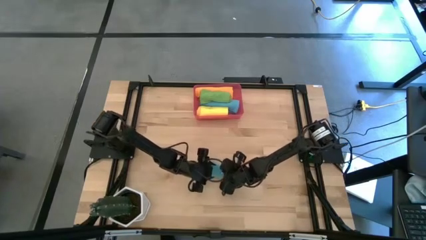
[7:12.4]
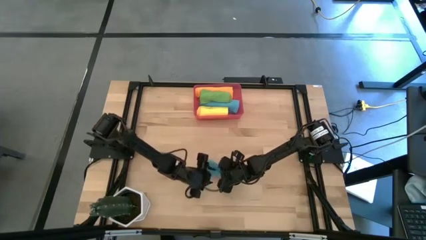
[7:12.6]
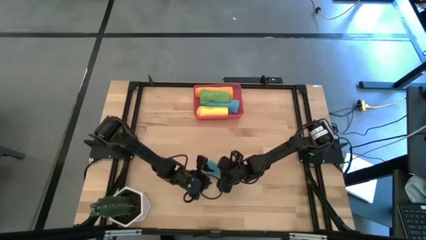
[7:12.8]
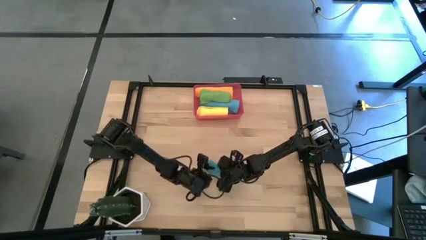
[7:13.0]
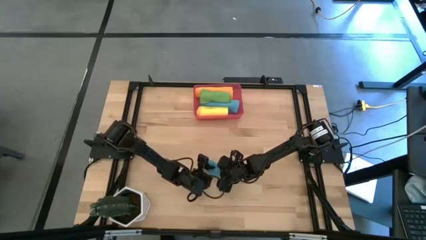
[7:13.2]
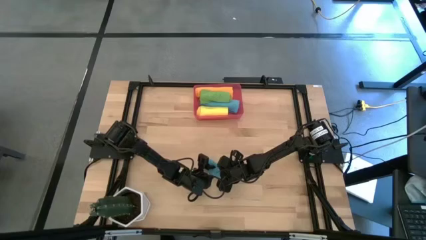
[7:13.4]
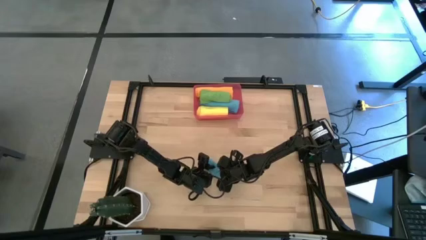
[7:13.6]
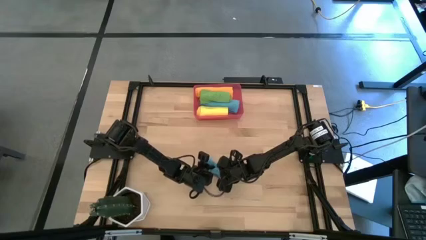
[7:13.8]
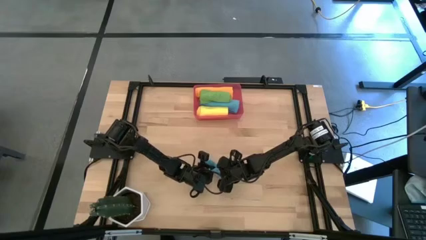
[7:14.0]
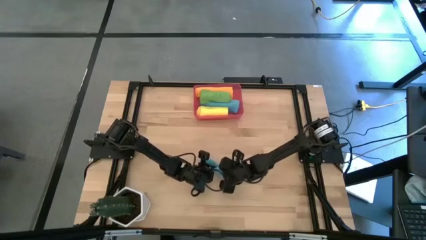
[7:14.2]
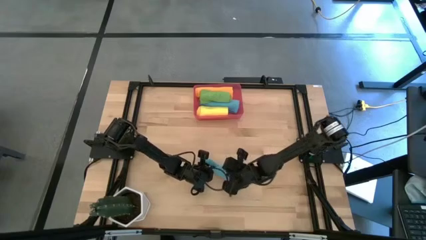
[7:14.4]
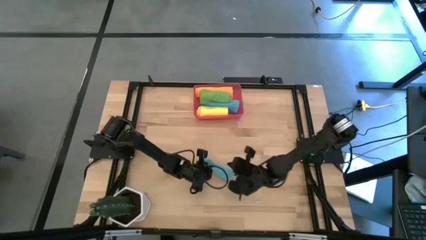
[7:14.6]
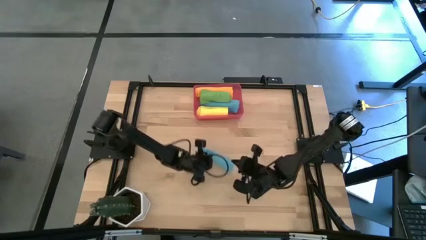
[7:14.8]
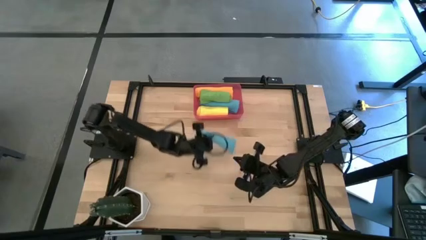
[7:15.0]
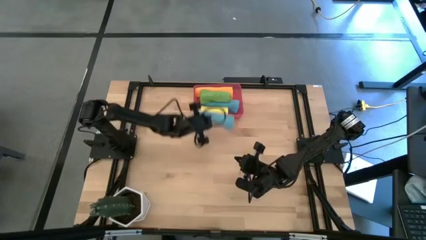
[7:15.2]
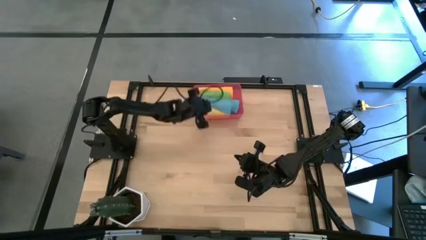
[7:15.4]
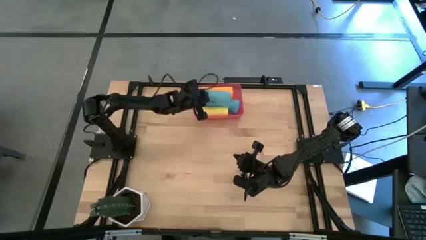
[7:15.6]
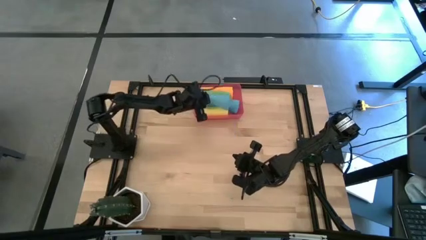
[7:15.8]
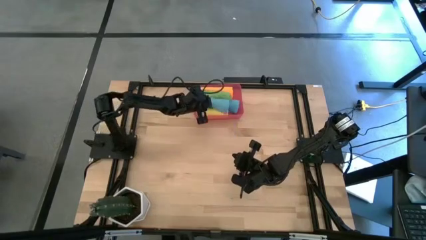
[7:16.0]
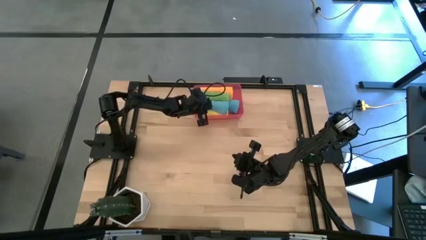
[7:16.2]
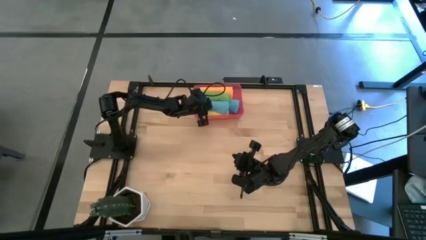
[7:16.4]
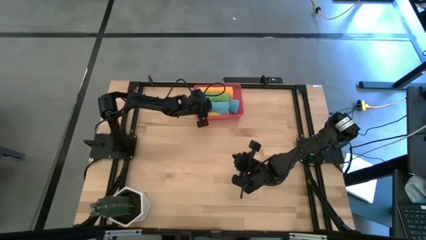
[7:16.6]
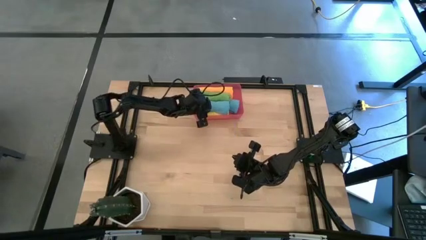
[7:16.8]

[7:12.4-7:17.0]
Task: Roll microfiber towels into tight, uniform cylinder then place into a basket
Put the blue microfiber cloth into the red bin

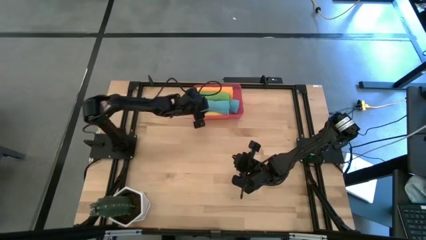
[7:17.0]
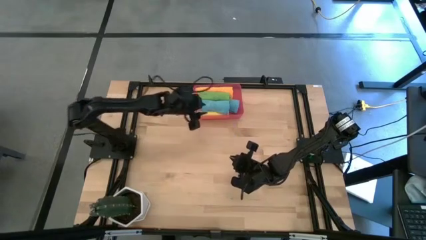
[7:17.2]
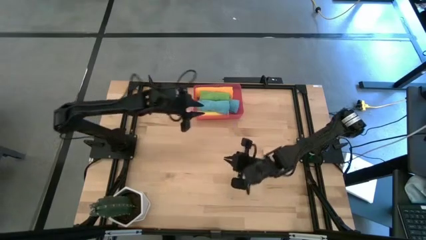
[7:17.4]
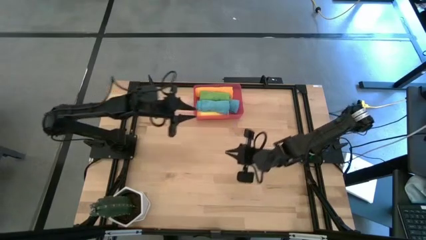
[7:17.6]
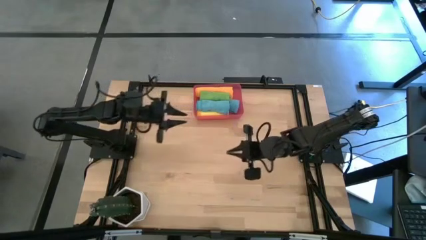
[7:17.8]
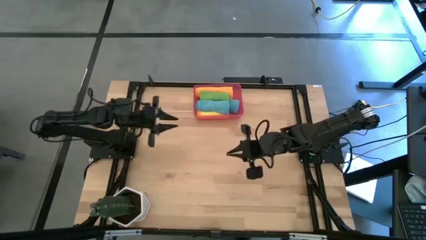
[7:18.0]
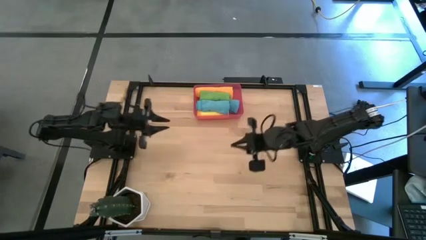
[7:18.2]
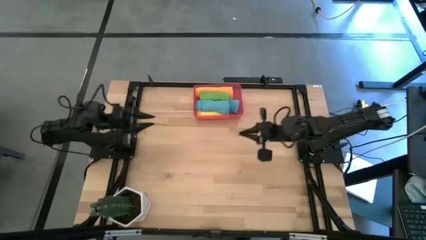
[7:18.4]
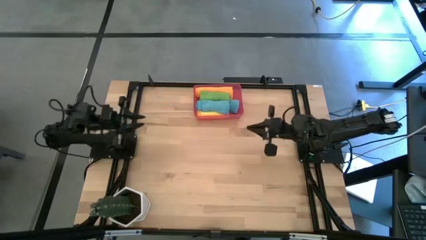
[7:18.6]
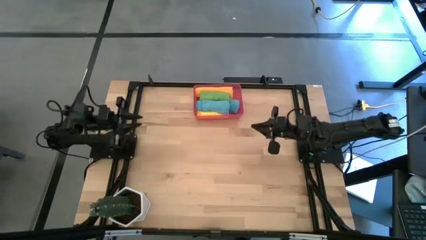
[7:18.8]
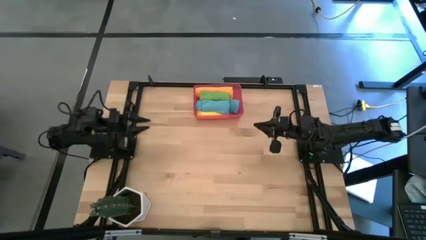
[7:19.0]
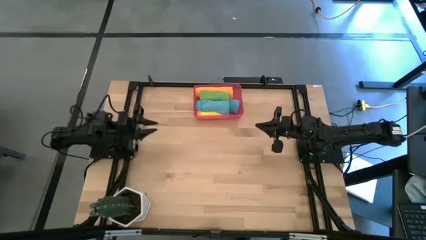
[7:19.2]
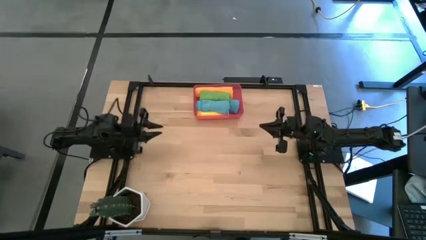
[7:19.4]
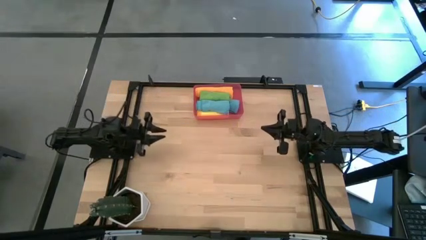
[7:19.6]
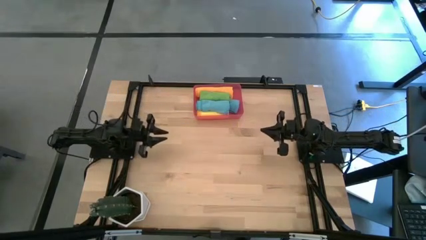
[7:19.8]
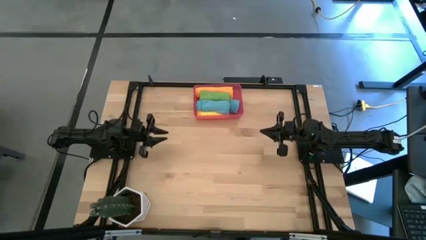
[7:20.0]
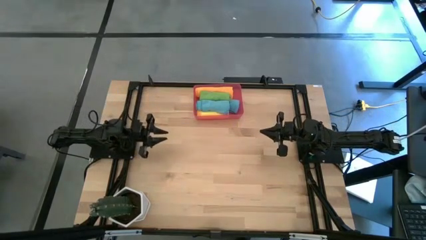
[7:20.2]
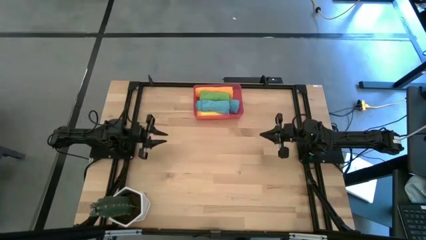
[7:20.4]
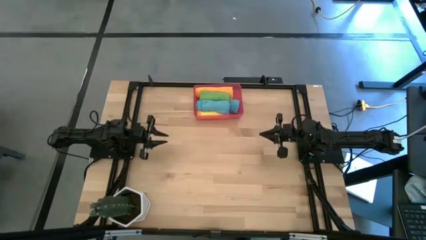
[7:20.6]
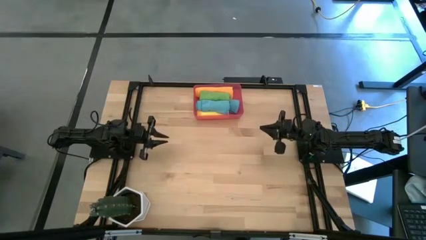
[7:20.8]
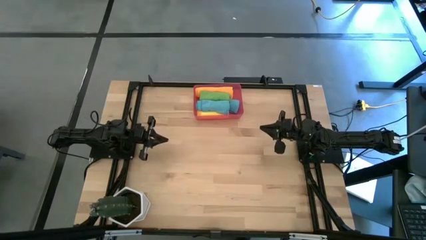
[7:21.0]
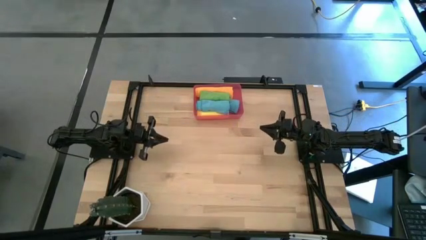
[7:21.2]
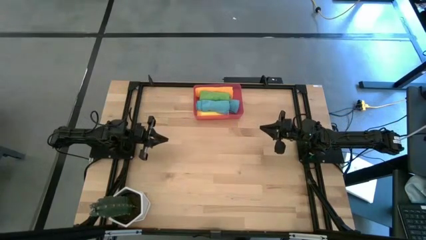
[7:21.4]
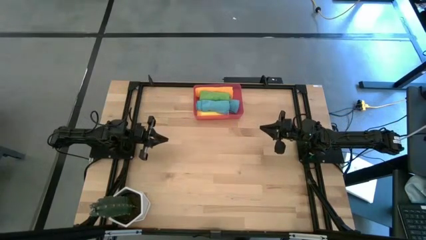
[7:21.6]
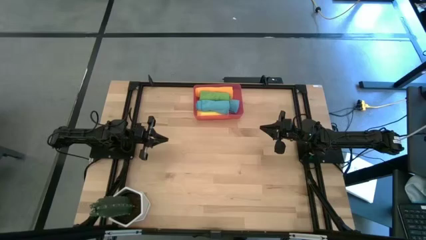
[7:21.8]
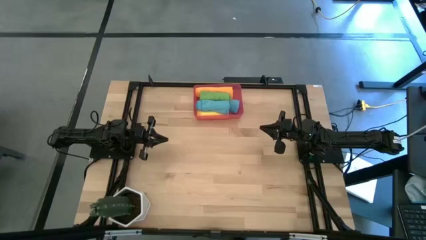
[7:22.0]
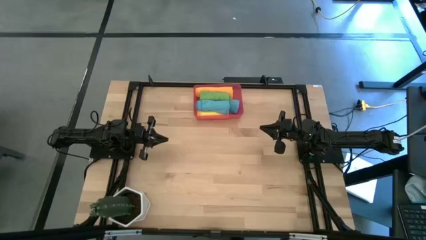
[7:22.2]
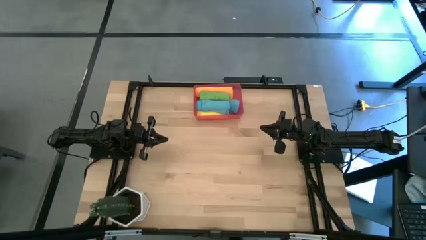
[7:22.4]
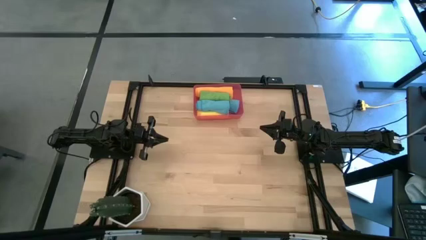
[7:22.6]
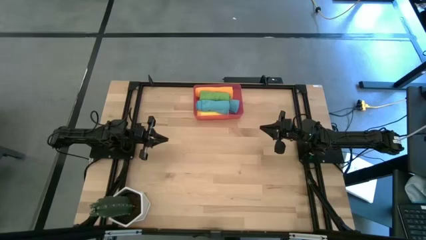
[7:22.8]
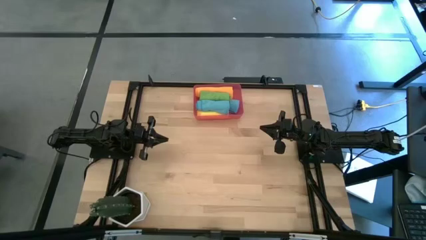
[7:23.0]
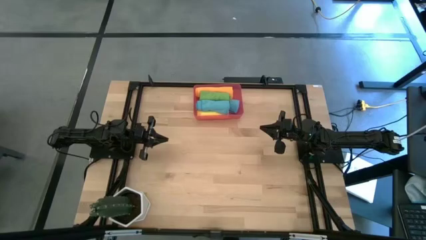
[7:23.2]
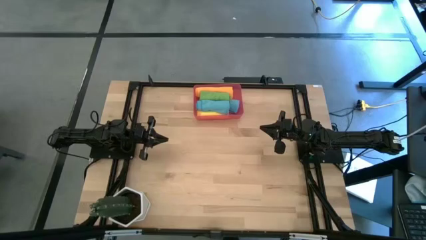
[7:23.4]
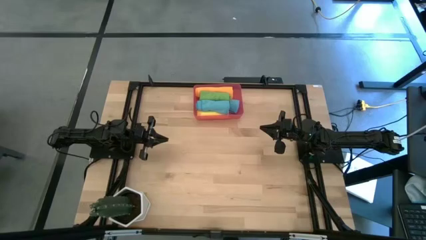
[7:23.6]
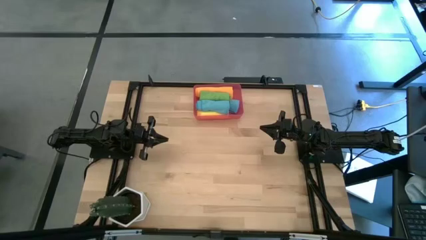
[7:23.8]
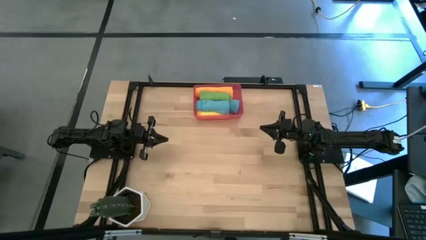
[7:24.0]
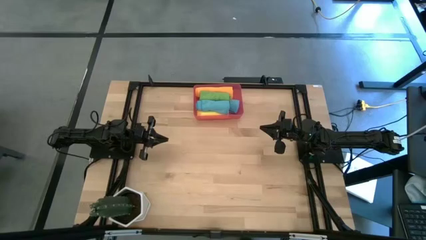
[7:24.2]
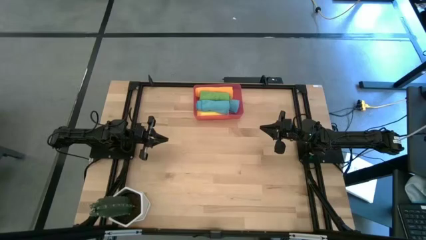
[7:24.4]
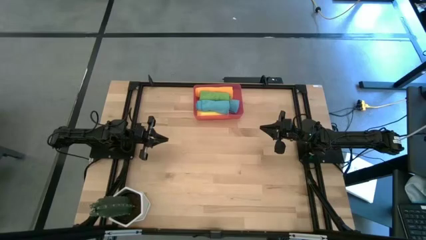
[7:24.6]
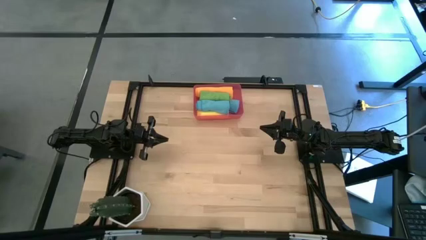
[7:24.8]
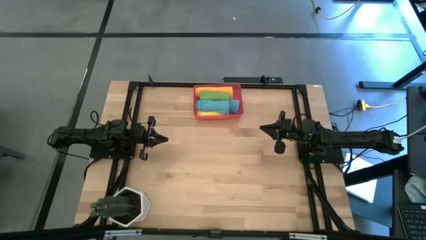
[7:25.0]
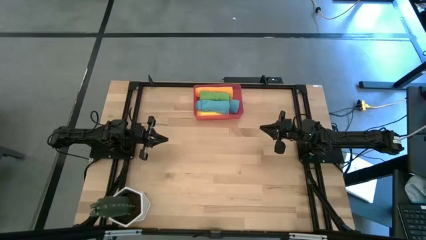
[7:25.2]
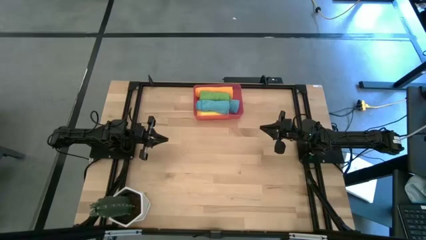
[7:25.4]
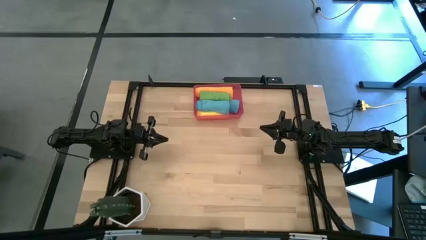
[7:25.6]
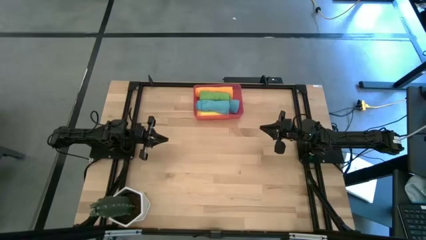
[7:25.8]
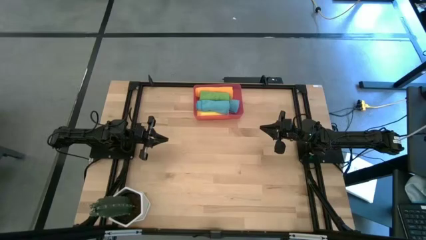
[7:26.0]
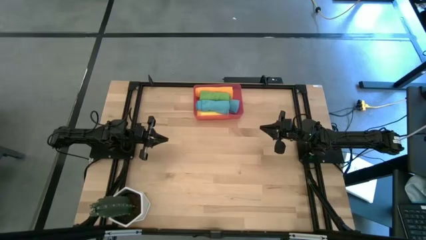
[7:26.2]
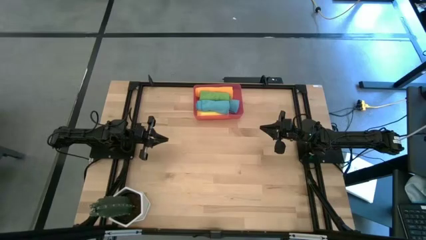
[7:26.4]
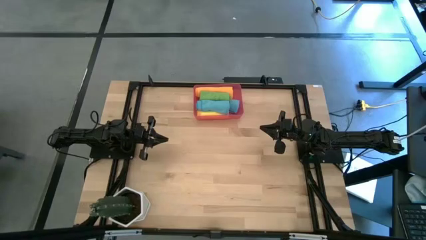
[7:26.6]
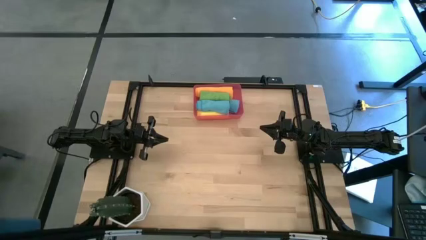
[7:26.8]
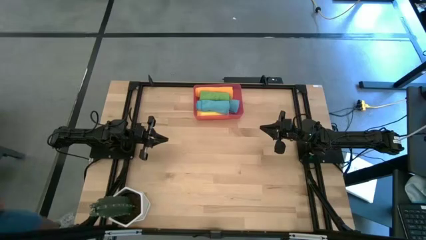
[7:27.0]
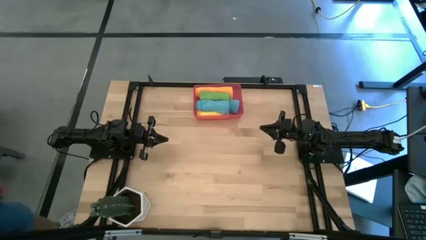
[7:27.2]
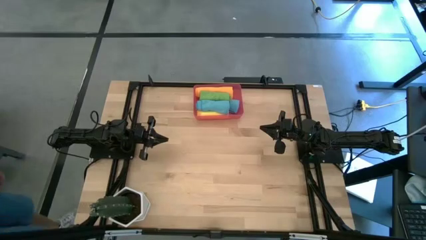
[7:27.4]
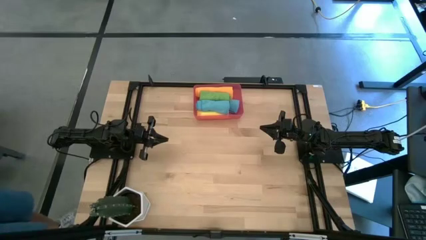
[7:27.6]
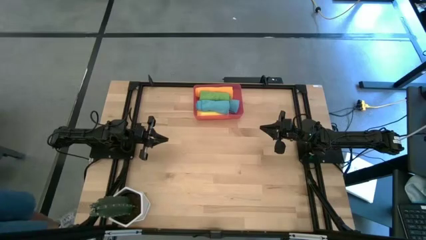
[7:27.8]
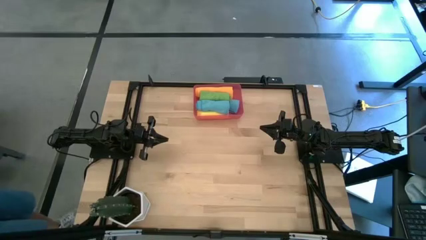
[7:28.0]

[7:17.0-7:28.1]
Return to Home Position
